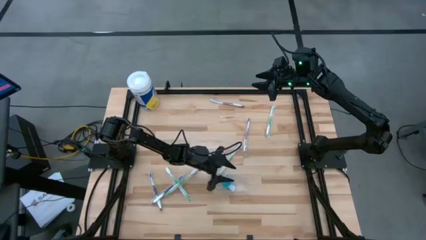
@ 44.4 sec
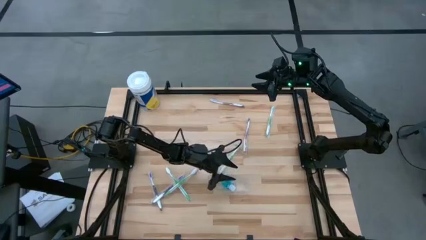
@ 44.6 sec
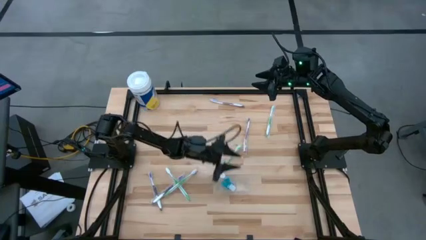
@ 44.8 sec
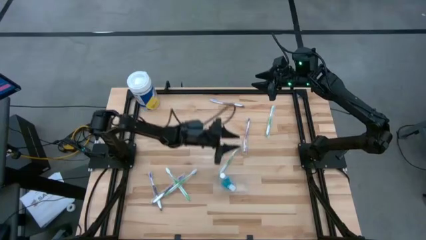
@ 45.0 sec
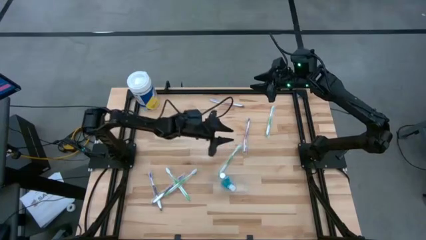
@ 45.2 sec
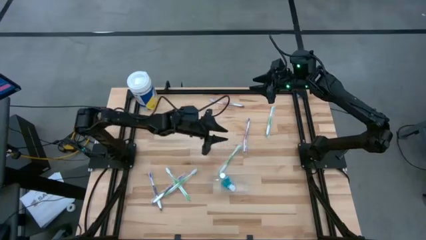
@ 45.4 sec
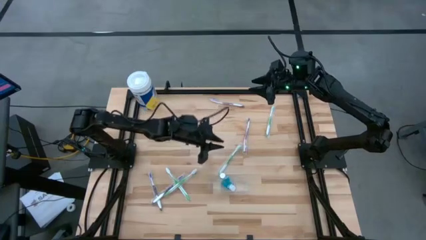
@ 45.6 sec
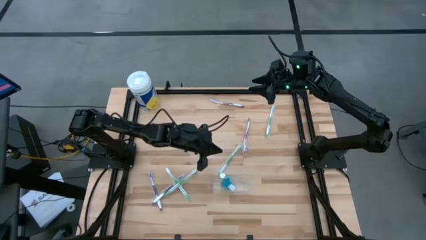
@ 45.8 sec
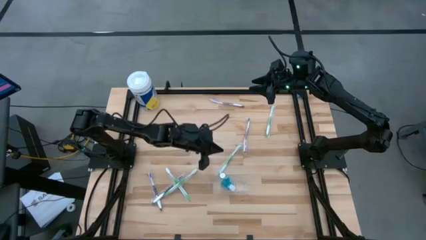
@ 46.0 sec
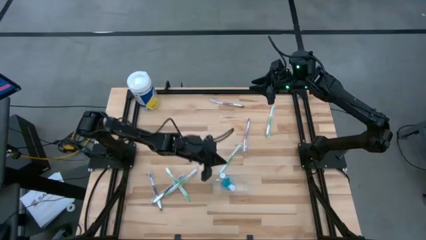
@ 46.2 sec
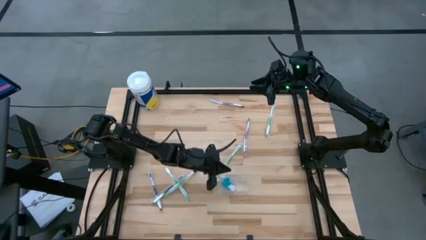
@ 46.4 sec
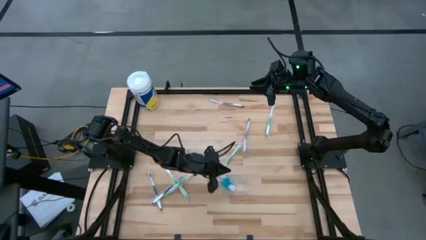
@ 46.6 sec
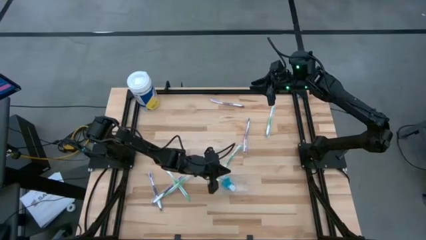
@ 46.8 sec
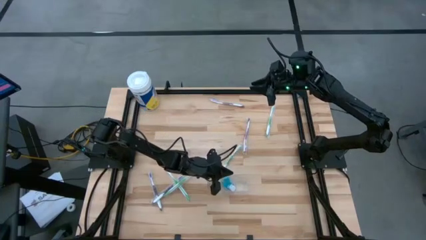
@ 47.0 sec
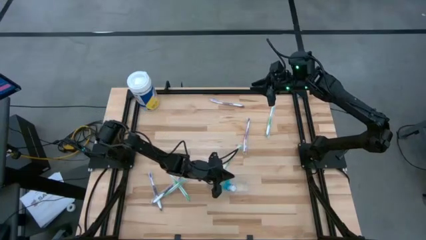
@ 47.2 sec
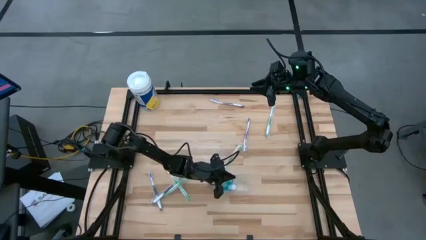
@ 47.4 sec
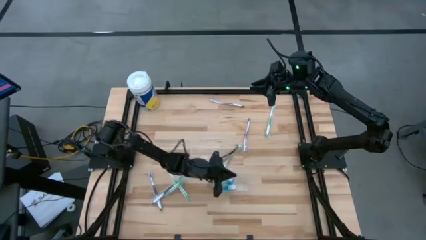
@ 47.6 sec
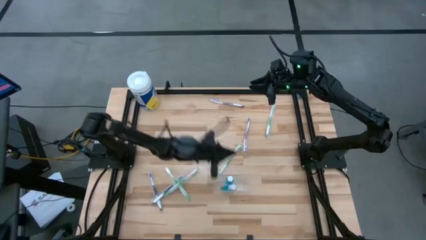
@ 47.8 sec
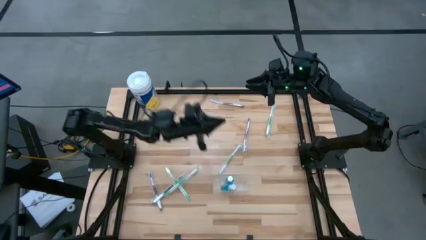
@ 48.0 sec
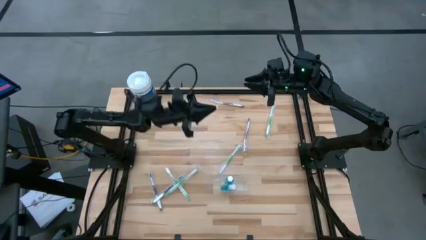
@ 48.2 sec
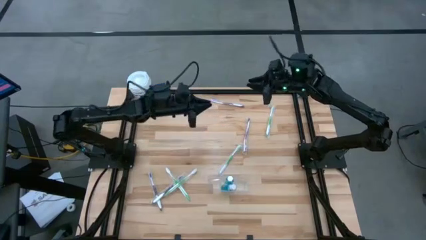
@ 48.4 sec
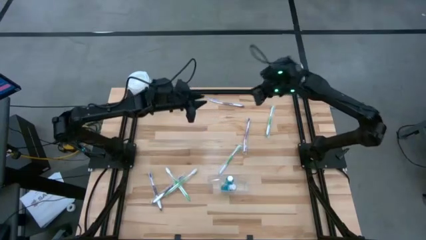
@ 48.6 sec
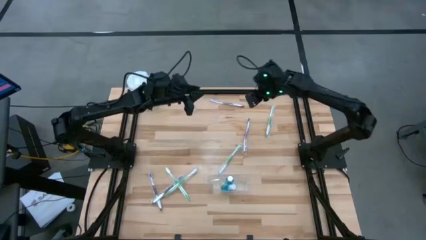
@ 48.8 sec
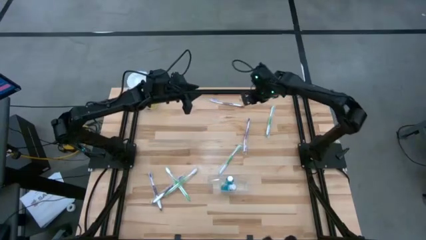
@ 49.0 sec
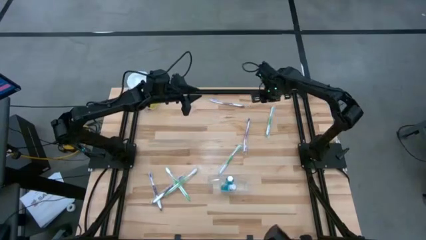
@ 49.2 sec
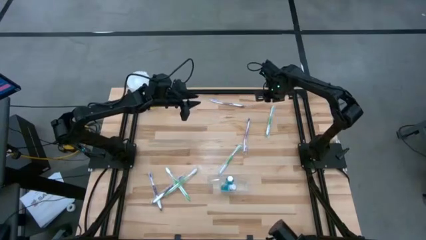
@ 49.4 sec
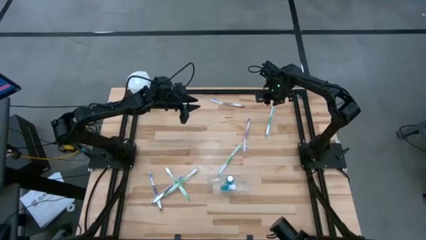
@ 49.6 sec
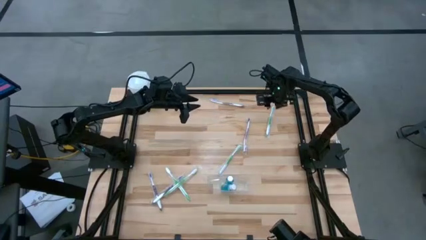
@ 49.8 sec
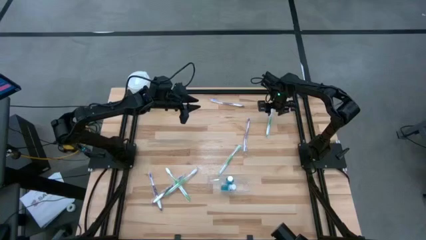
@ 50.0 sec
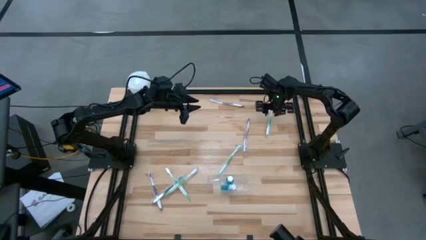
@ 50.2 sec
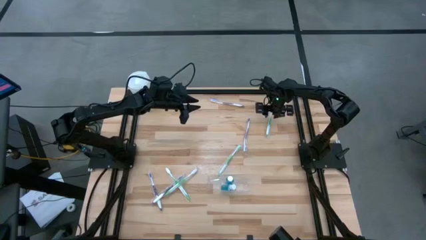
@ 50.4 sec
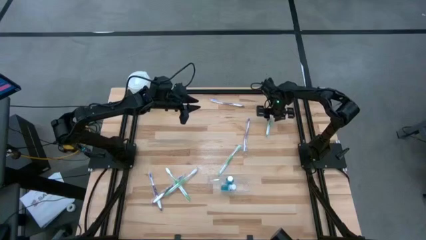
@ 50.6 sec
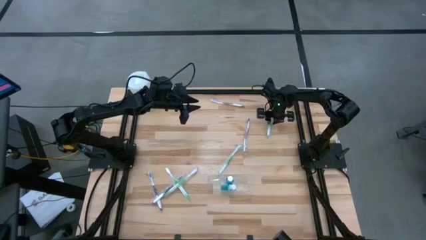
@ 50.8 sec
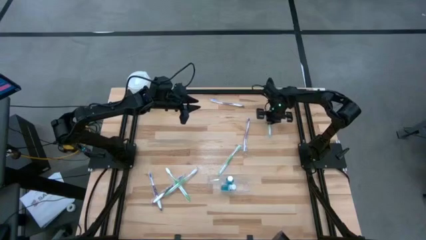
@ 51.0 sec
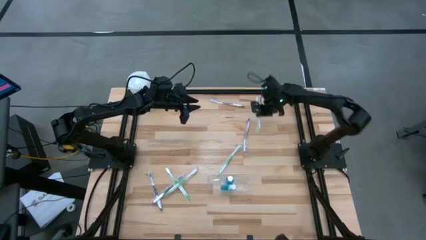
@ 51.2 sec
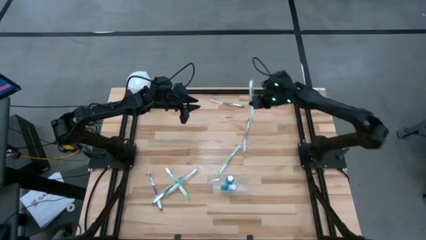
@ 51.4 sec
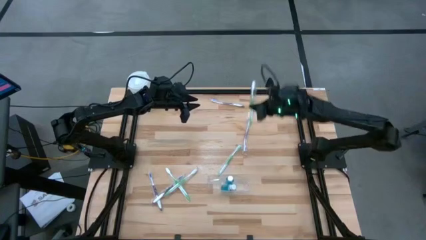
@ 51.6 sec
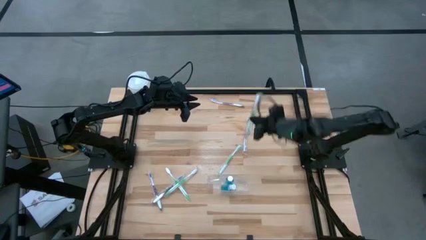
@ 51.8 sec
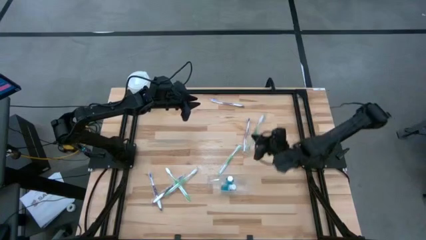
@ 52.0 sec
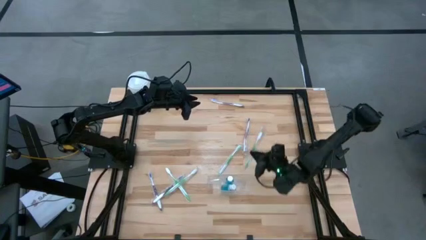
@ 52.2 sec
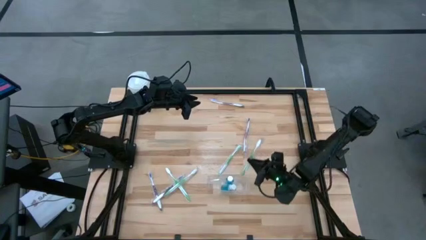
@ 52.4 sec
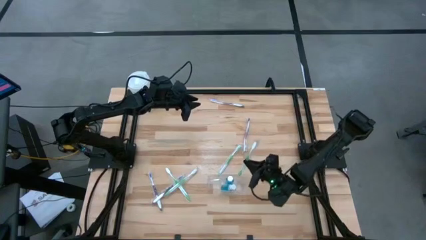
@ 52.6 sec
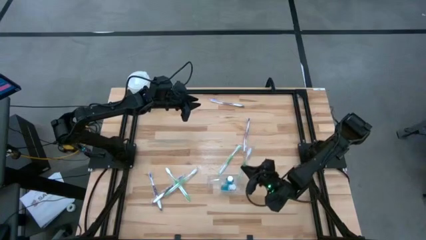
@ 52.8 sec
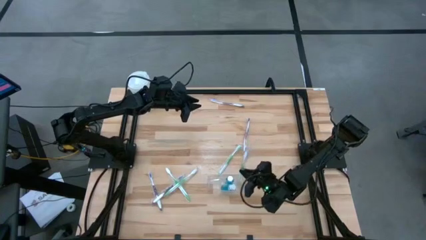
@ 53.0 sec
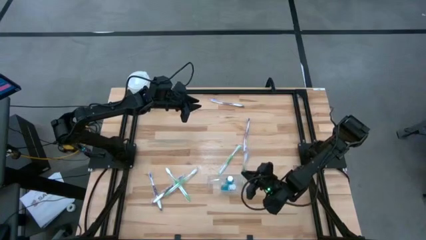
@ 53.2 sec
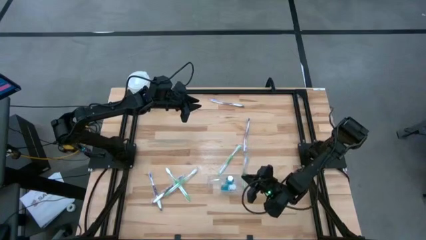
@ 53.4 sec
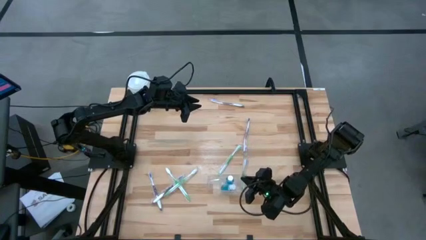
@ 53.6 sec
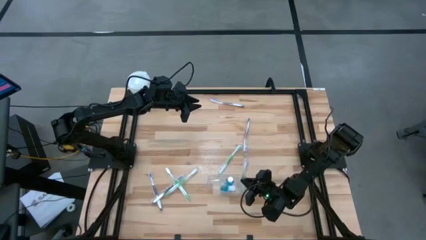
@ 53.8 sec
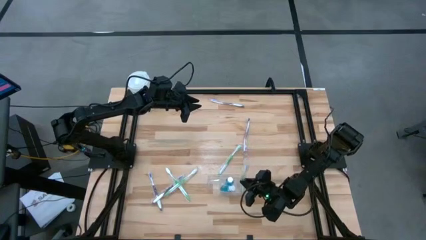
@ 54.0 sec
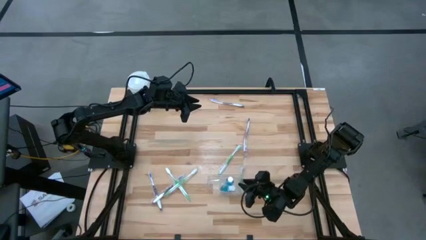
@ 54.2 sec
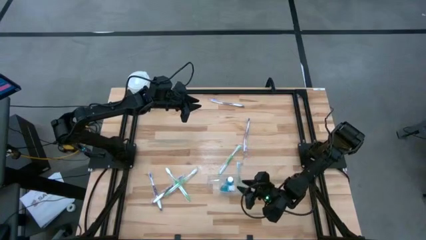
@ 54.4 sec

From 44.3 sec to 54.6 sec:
Task: Pick & Place toothbrushing station
Put the green toothbrush in the transparent organizer

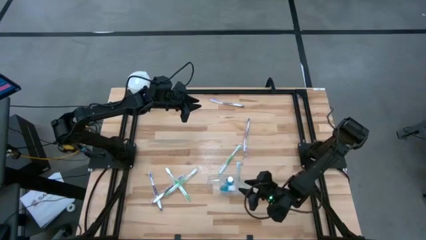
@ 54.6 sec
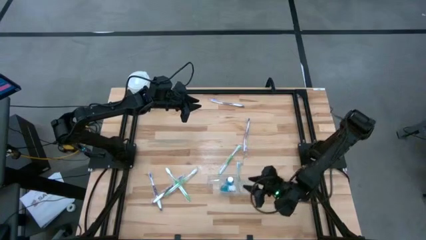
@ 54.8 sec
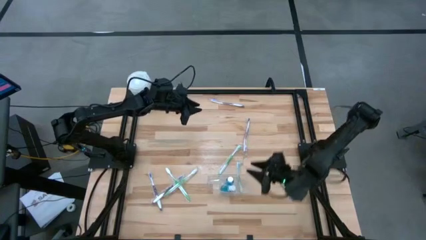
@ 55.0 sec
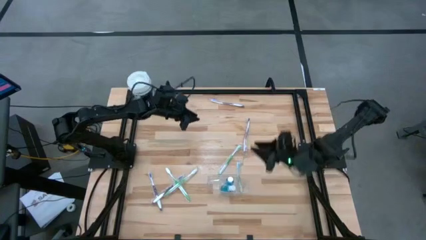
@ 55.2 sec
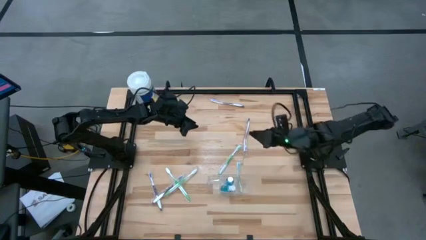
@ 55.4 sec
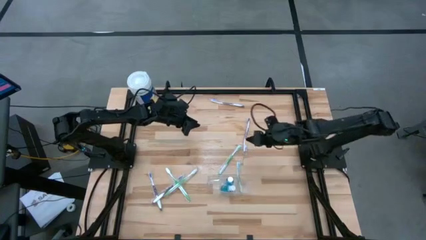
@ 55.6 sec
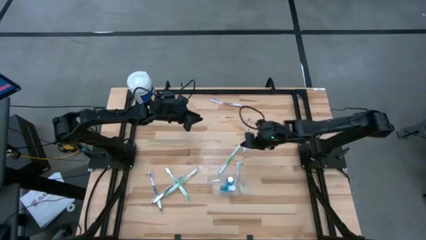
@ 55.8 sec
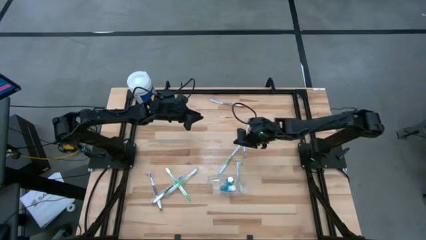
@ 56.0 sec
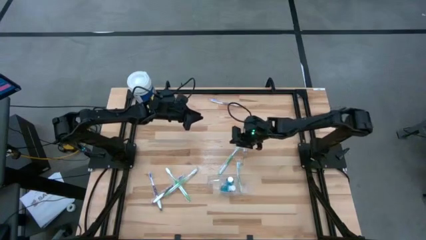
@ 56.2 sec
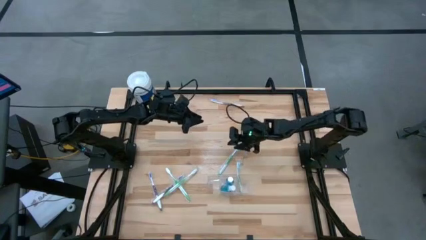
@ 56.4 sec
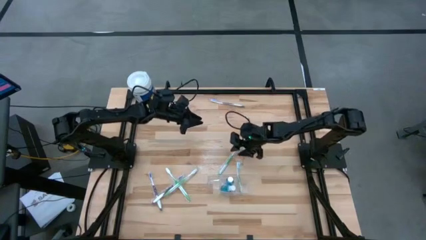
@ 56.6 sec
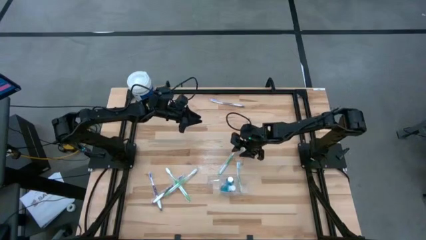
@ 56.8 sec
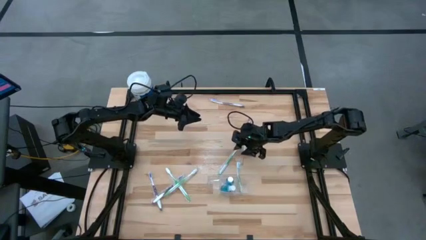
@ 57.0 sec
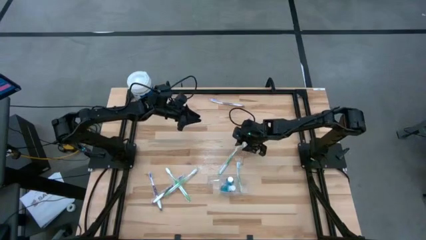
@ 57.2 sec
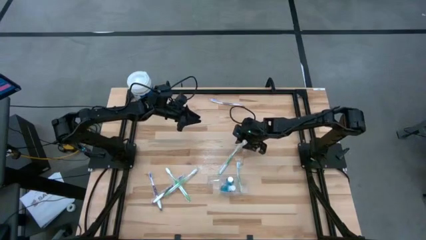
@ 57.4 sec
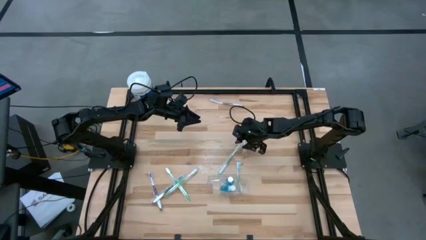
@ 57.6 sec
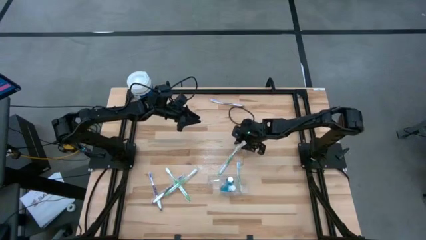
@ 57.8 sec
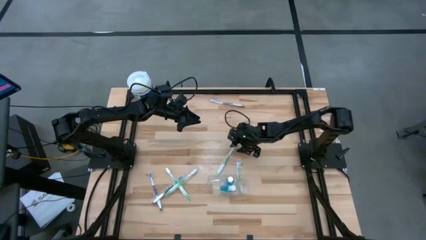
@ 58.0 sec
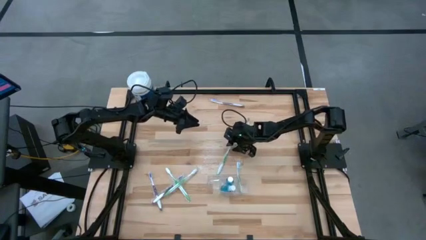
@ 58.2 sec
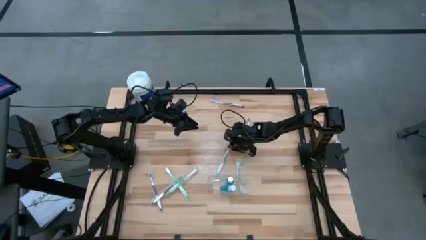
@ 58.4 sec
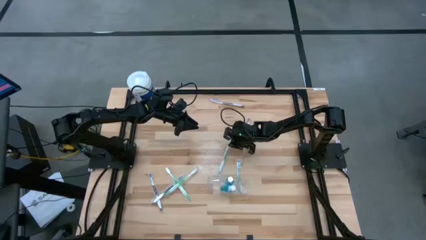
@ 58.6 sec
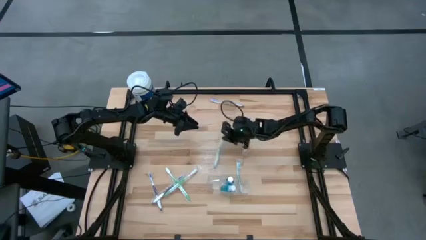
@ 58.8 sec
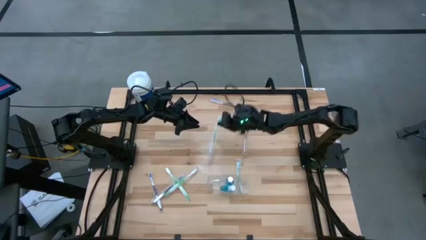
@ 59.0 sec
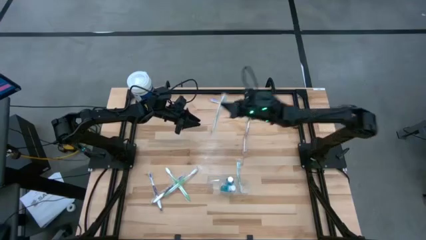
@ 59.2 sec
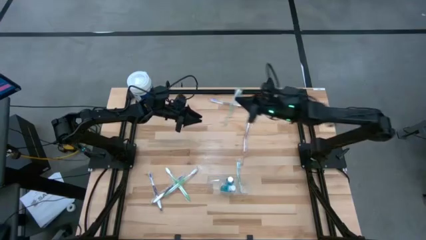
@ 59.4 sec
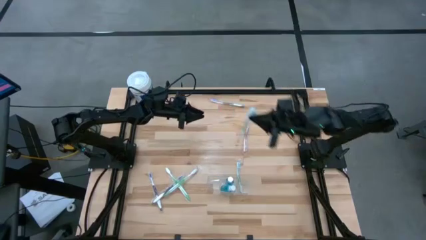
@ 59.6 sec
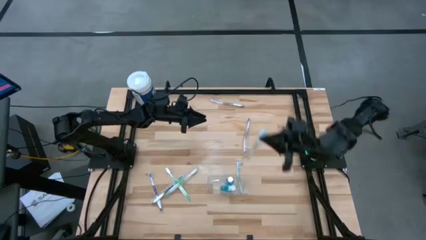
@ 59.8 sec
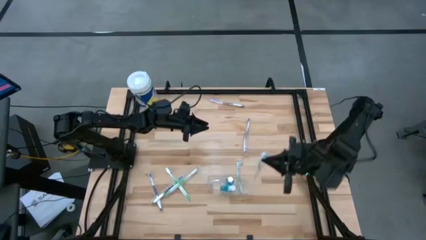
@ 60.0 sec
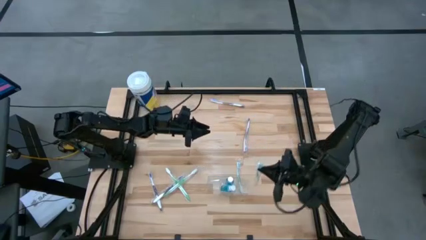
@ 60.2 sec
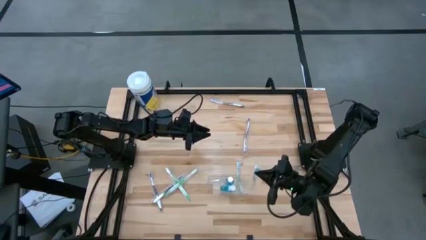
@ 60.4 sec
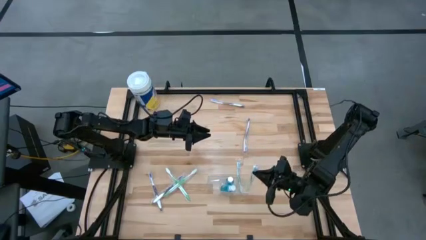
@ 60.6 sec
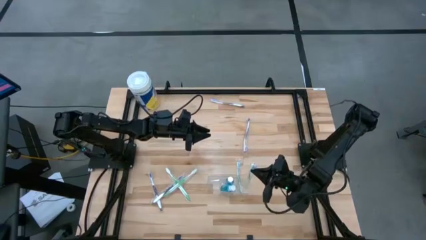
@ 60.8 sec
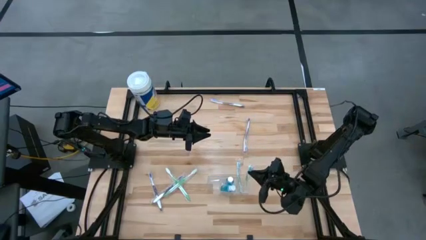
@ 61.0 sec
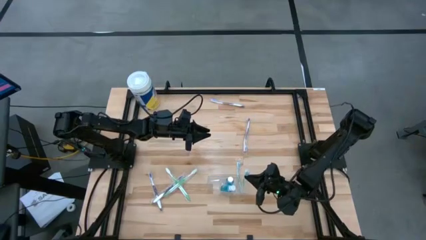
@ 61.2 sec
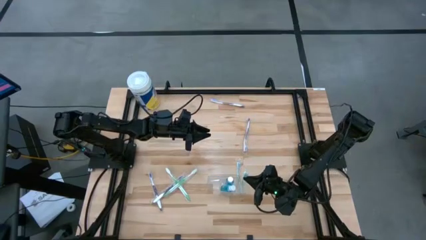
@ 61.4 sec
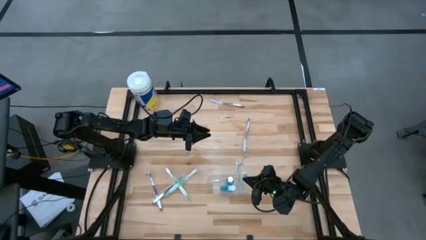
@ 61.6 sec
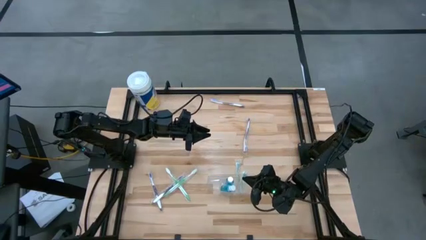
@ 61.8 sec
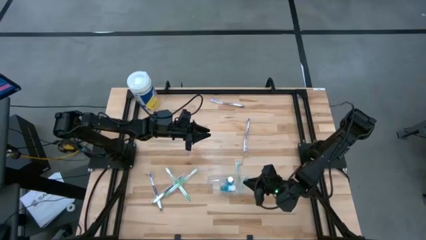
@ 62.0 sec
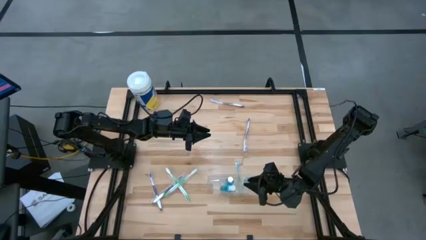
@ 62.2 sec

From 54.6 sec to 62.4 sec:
Put the green toothbrush in the transparent organizer
